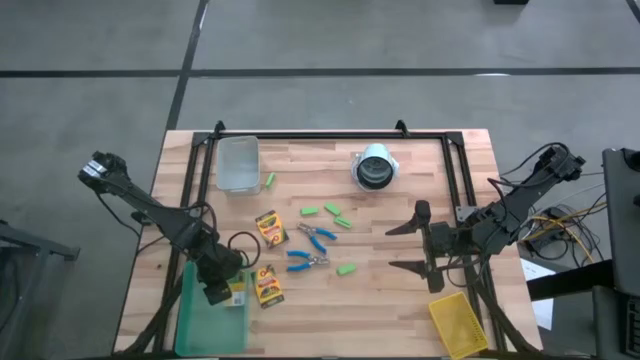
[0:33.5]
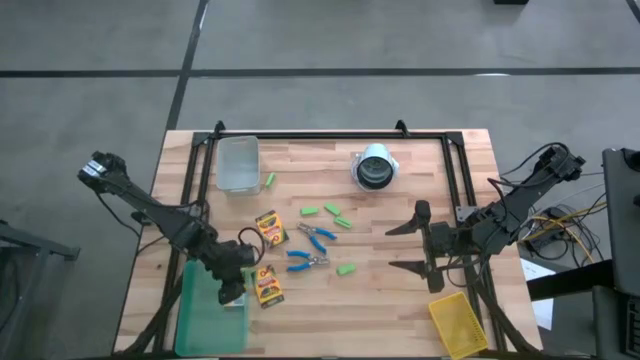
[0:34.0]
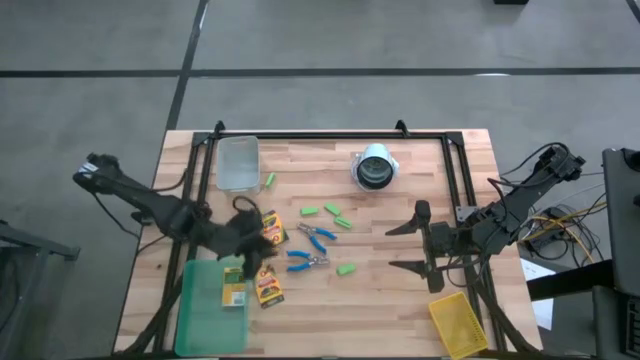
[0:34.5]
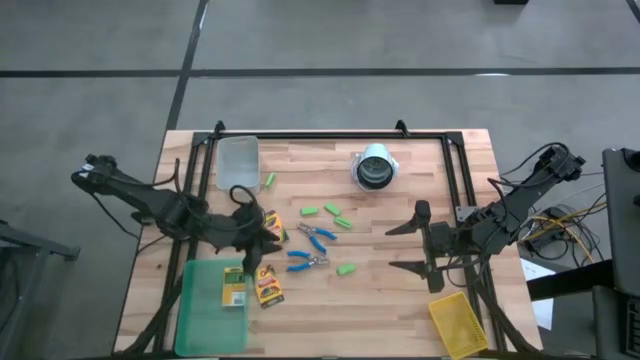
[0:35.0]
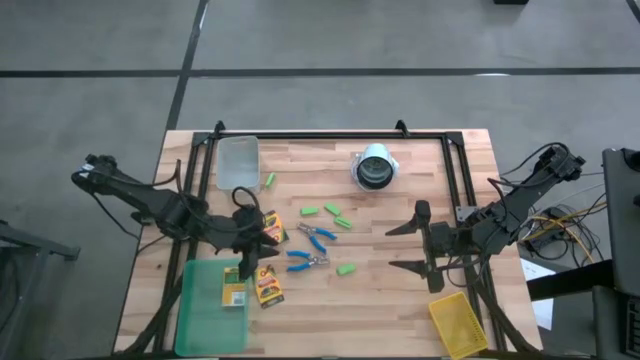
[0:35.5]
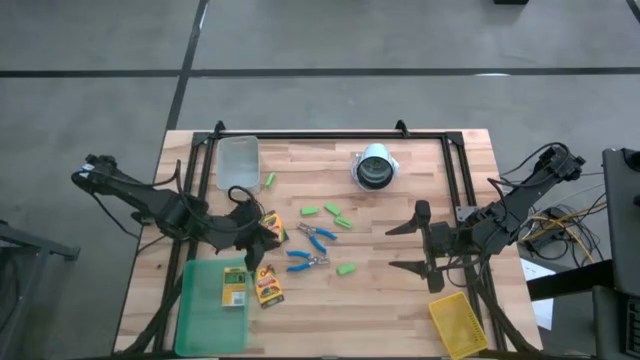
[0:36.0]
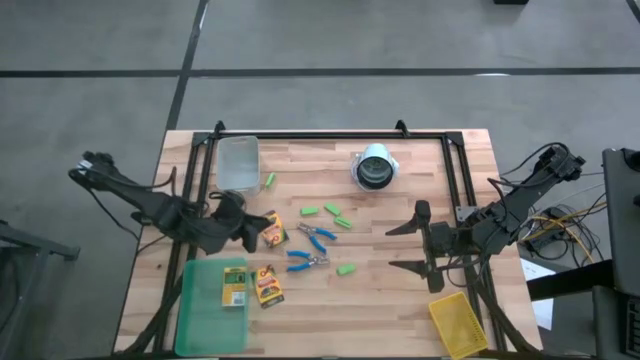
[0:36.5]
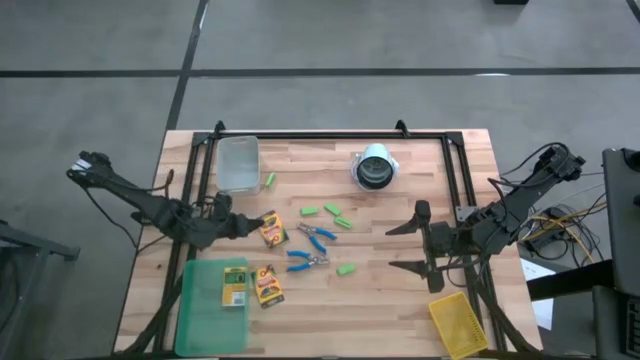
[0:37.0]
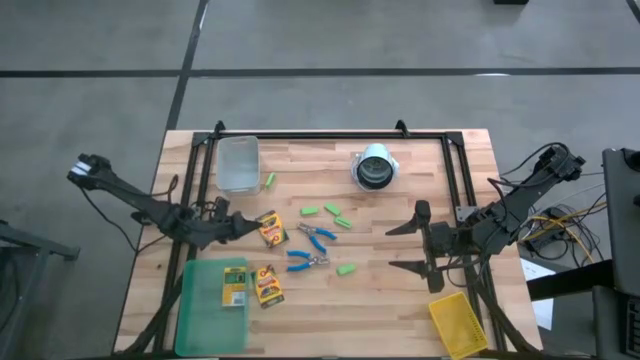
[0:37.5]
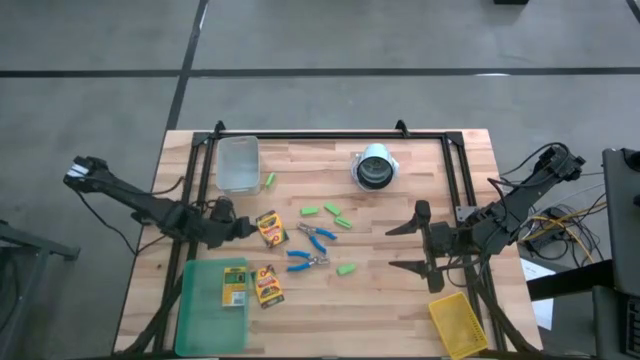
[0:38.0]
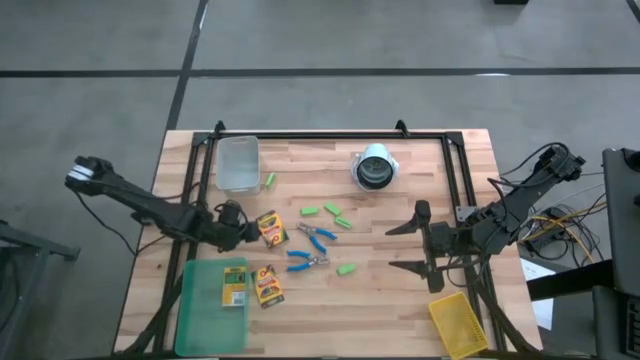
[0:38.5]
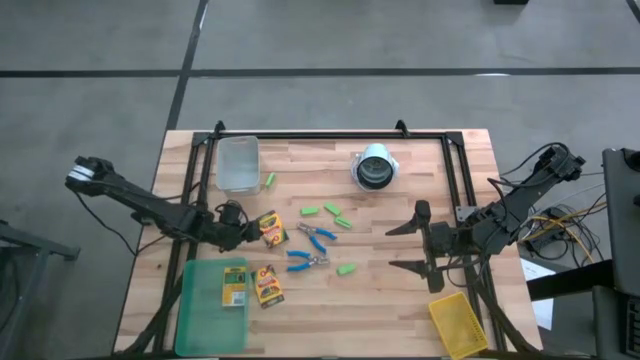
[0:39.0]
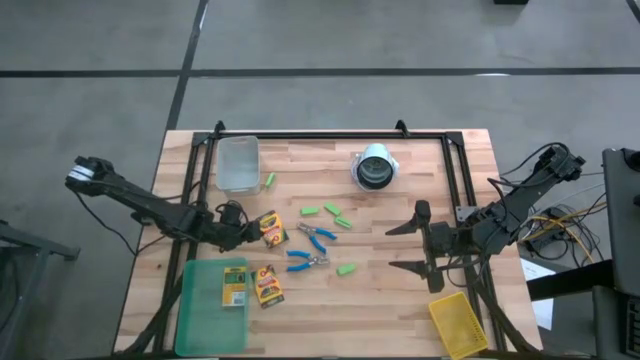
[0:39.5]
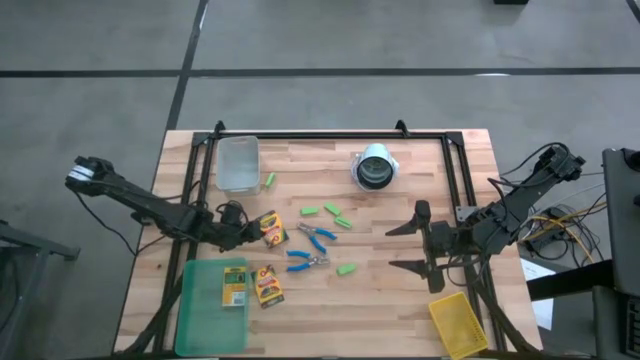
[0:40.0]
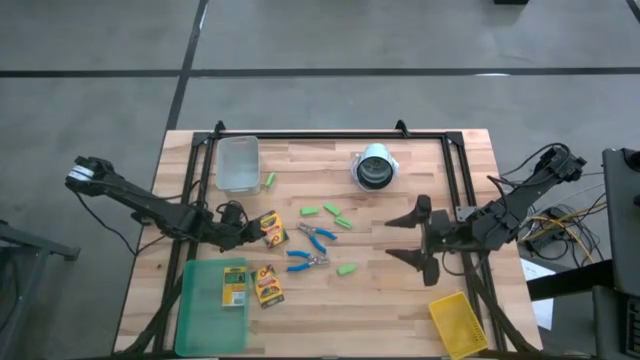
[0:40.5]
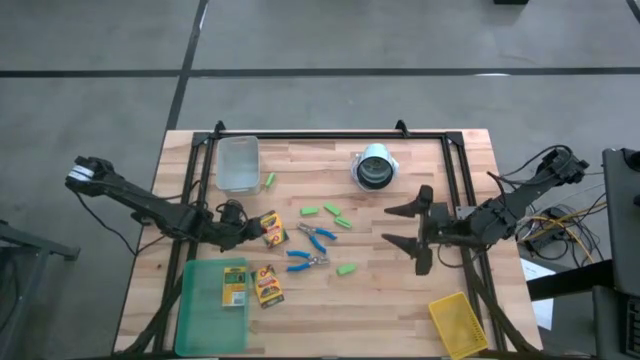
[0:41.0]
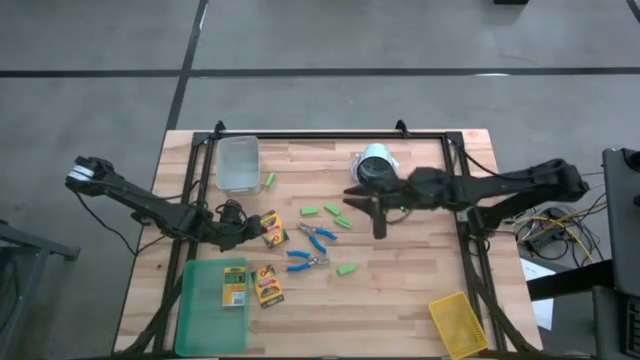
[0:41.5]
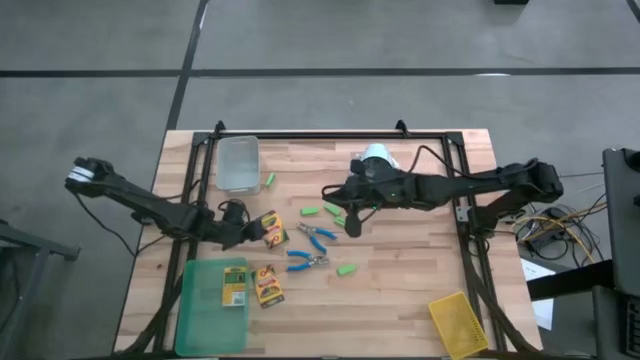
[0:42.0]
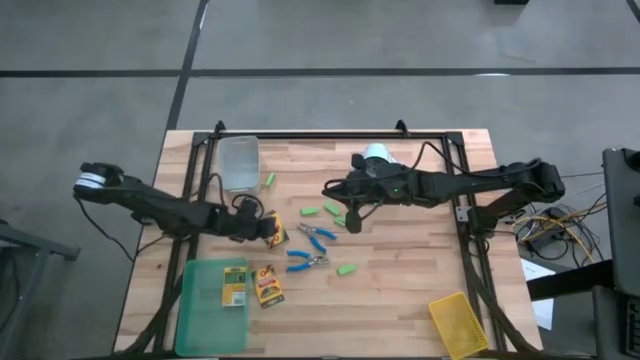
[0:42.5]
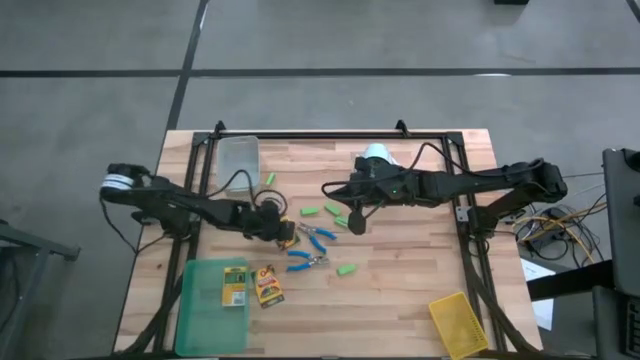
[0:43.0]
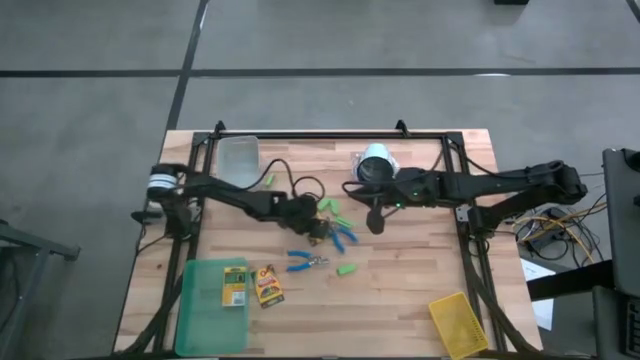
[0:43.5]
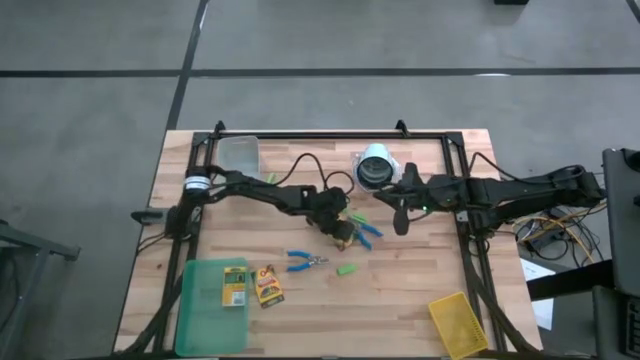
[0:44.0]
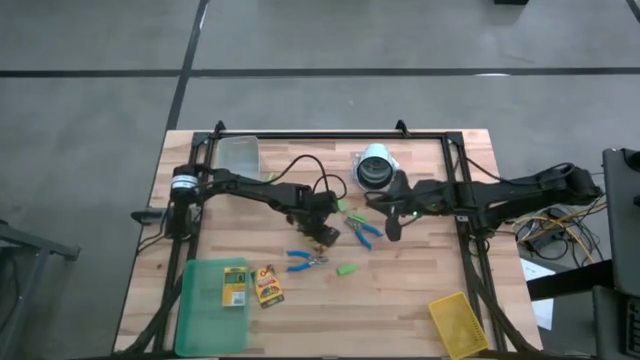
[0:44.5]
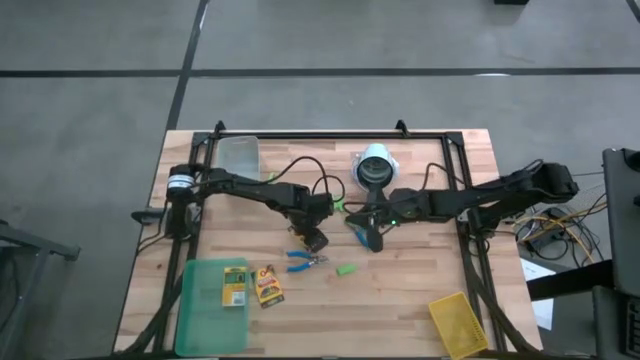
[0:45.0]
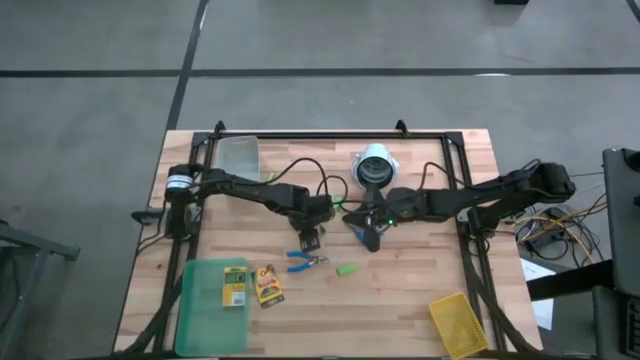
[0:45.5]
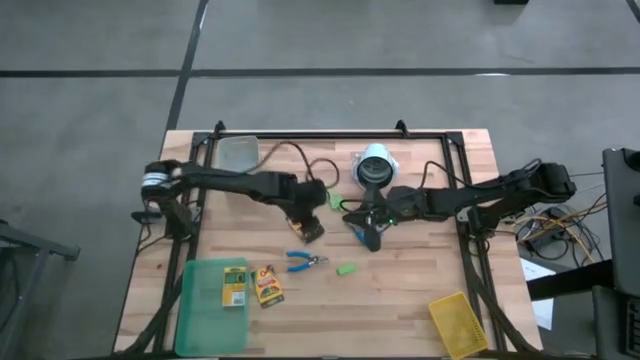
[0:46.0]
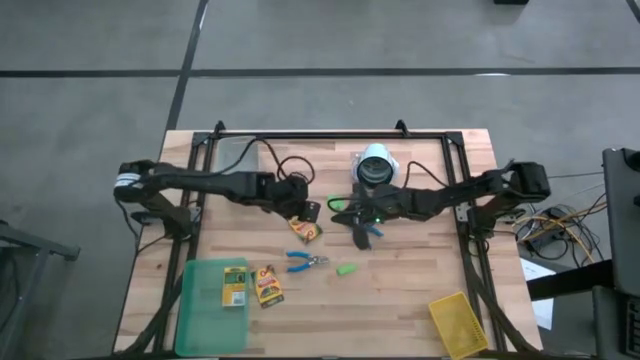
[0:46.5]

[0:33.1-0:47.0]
Task: Pick & Place School Supplies
Put the yellow crayon box into the green bin

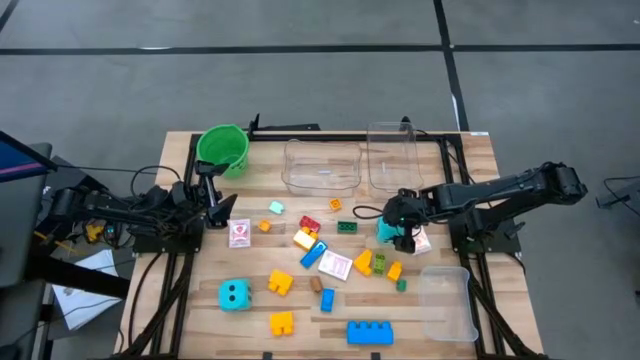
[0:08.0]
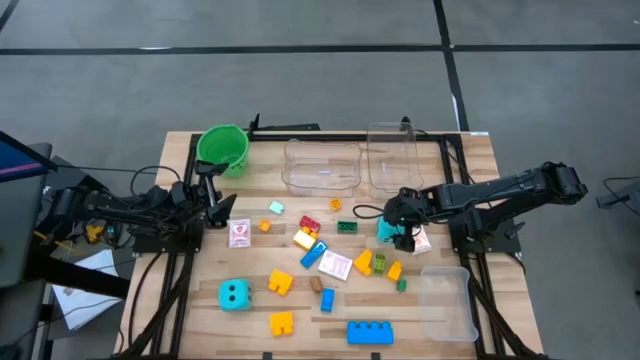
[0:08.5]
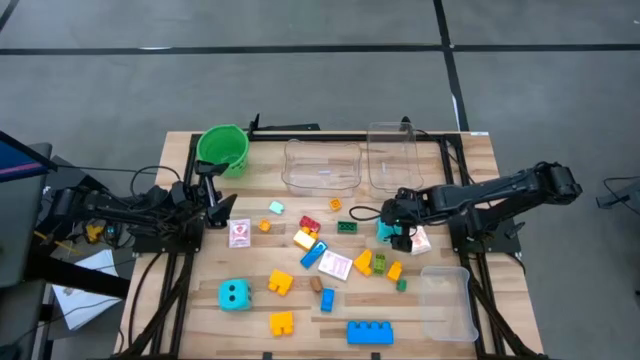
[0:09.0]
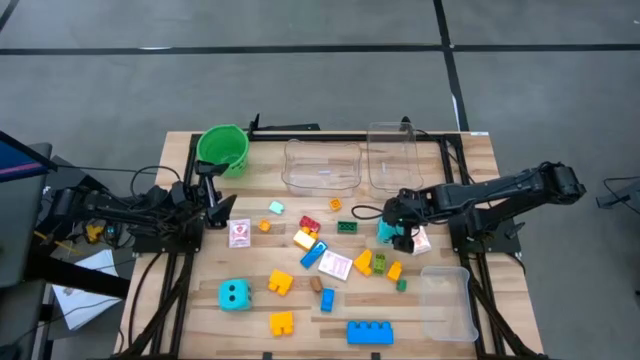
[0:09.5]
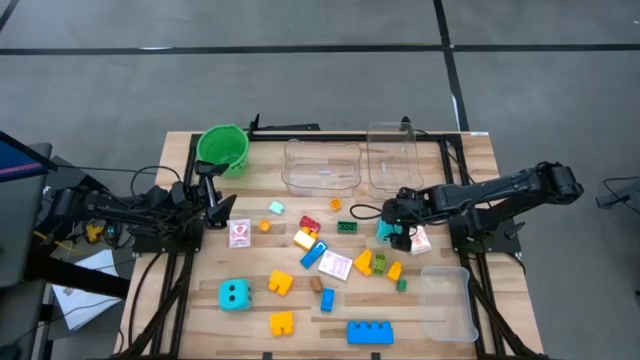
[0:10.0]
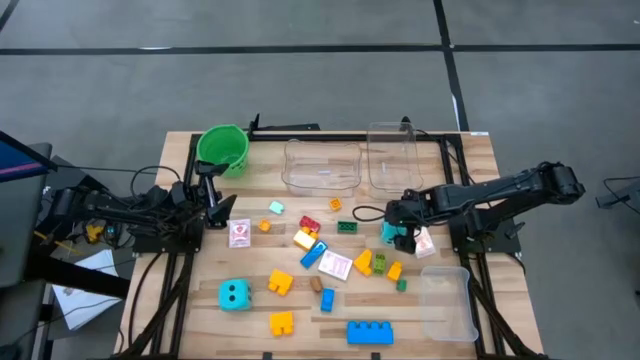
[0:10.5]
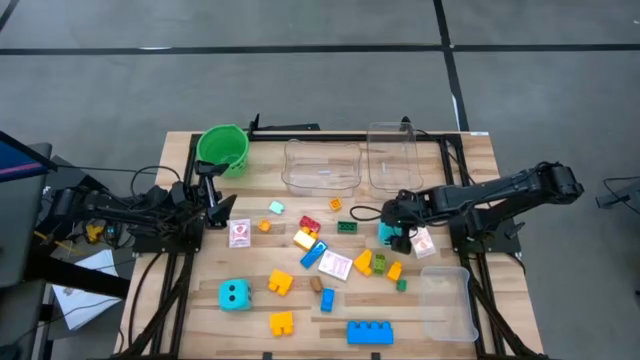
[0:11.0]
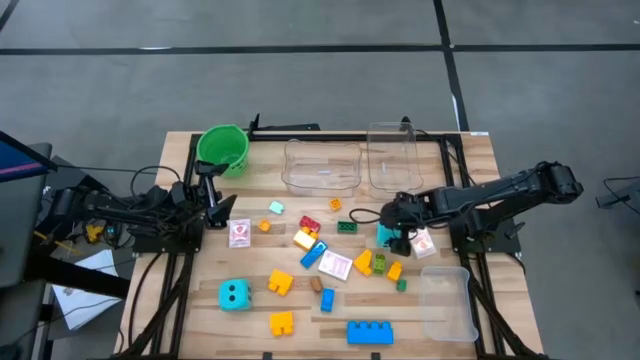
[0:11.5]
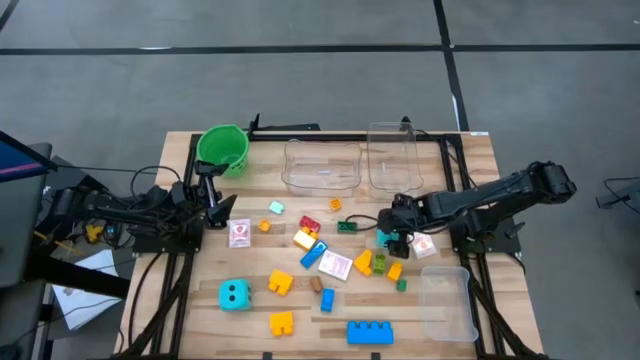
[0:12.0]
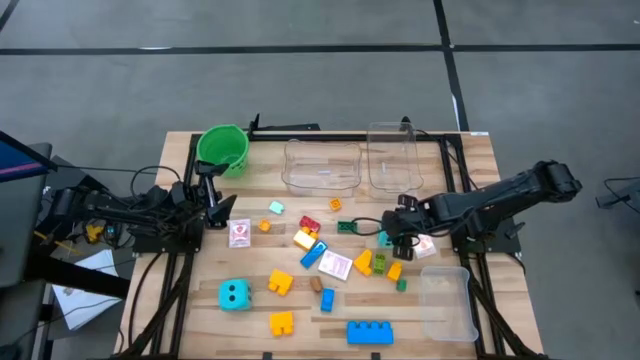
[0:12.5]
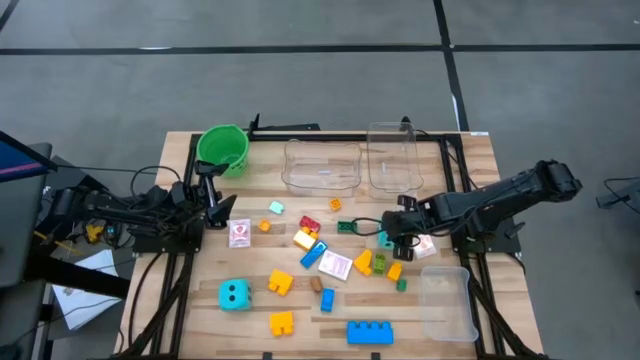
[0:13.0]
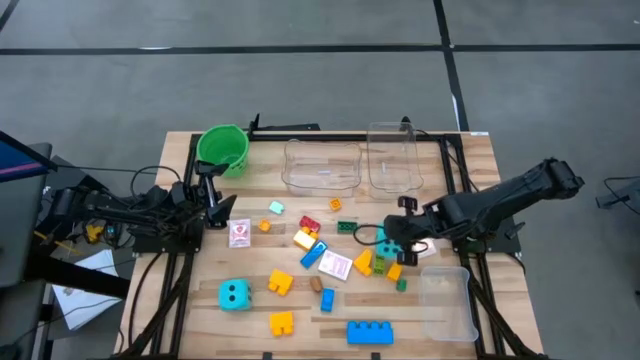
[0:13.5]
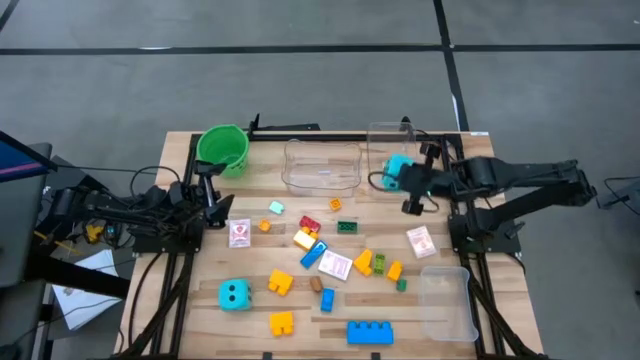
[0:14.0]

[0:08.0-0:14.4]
Task: Pick & Place Toys
Put the blue dice into the right transparent bin
